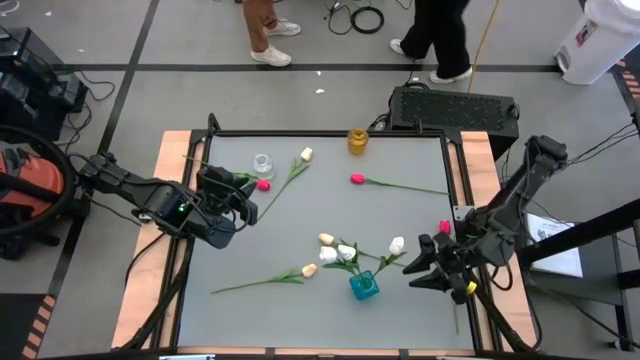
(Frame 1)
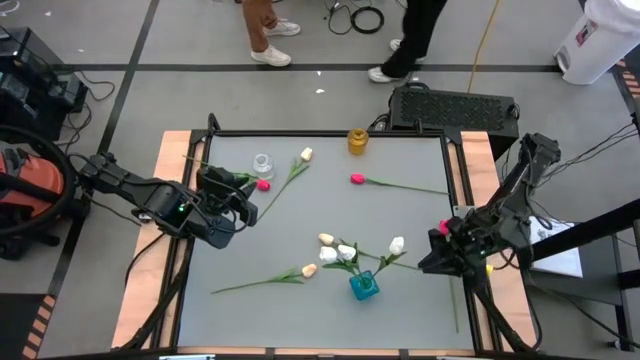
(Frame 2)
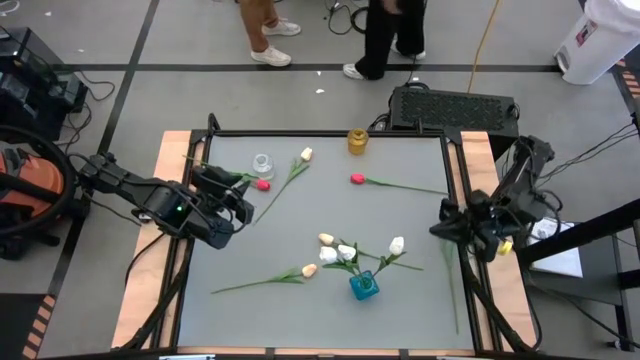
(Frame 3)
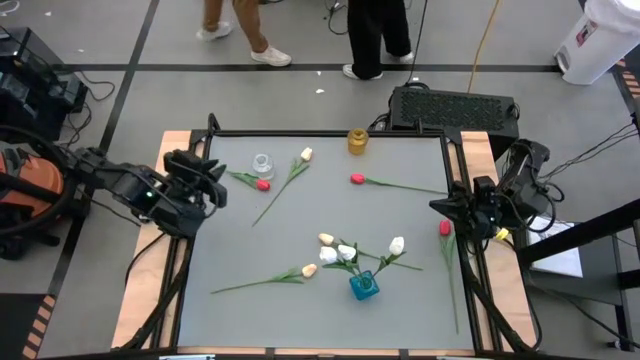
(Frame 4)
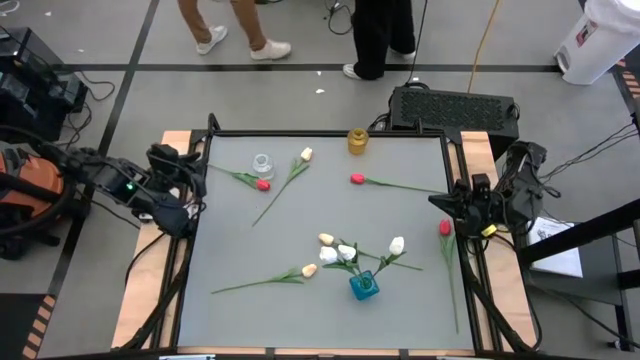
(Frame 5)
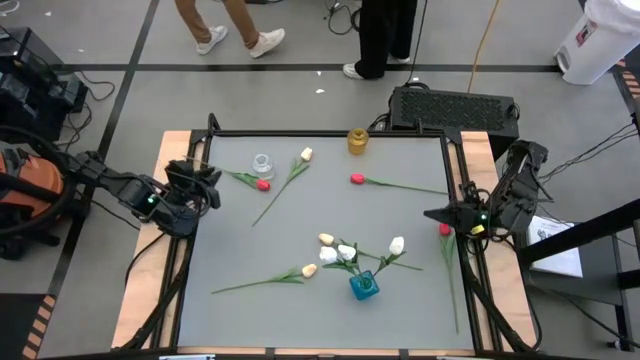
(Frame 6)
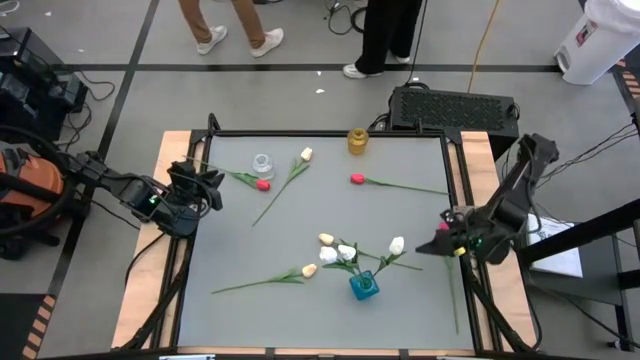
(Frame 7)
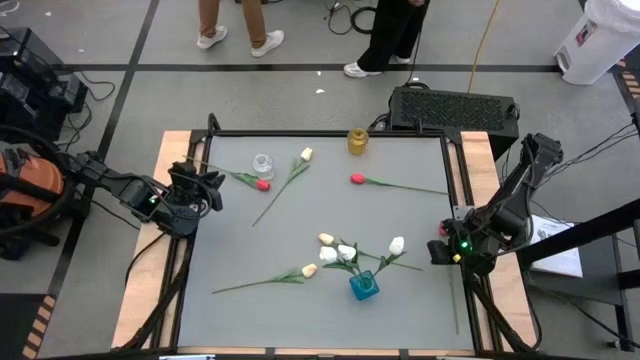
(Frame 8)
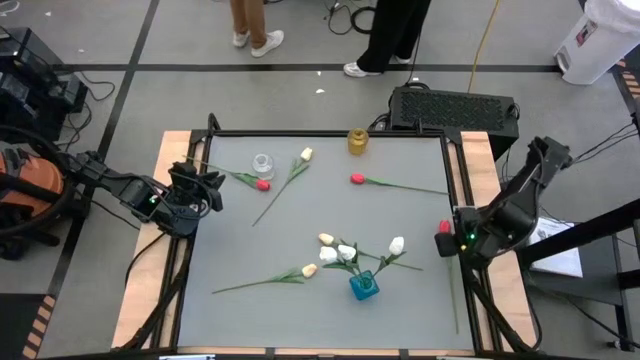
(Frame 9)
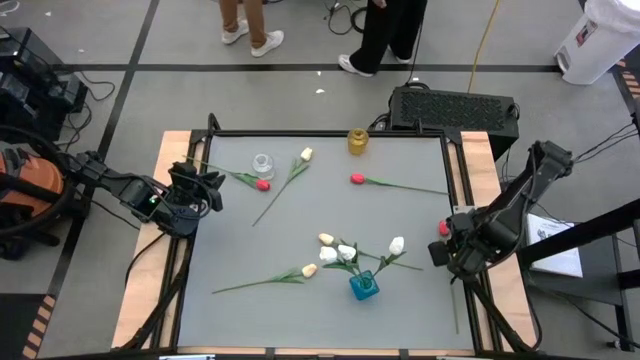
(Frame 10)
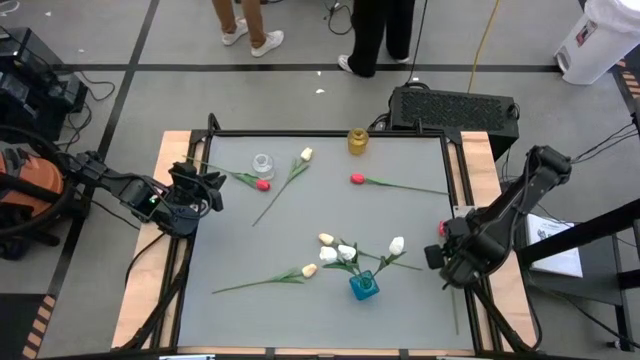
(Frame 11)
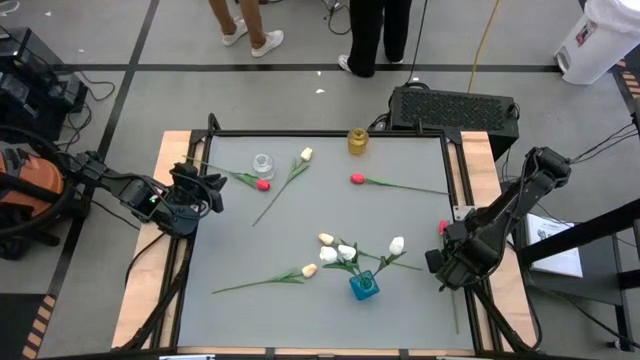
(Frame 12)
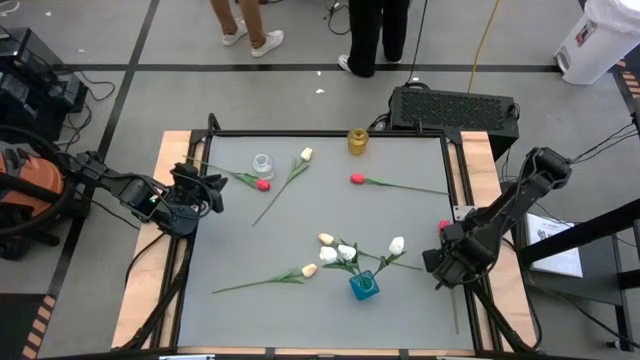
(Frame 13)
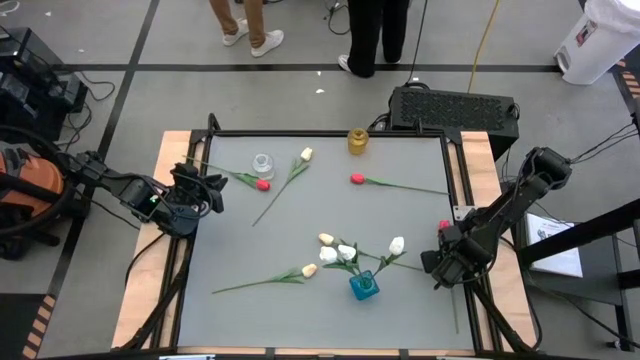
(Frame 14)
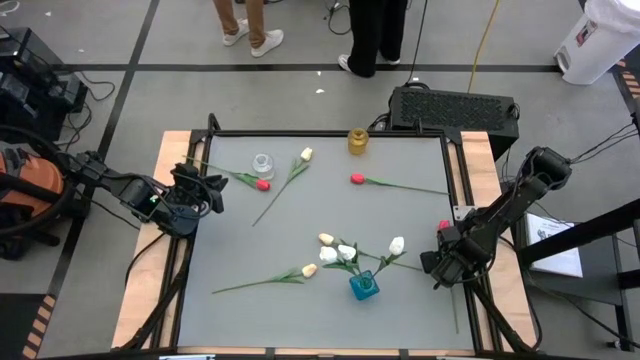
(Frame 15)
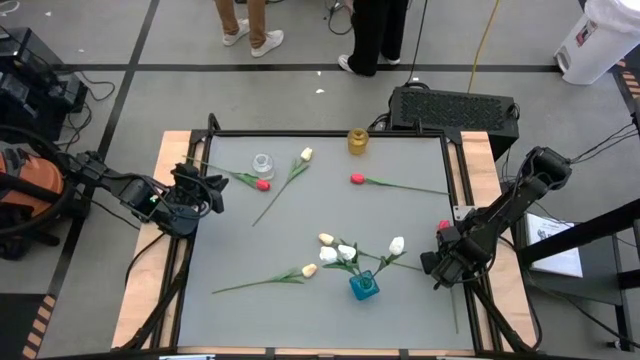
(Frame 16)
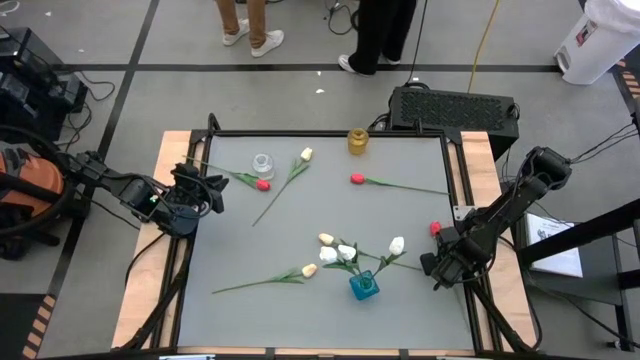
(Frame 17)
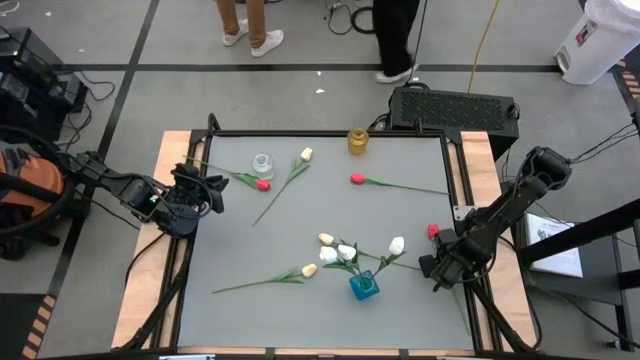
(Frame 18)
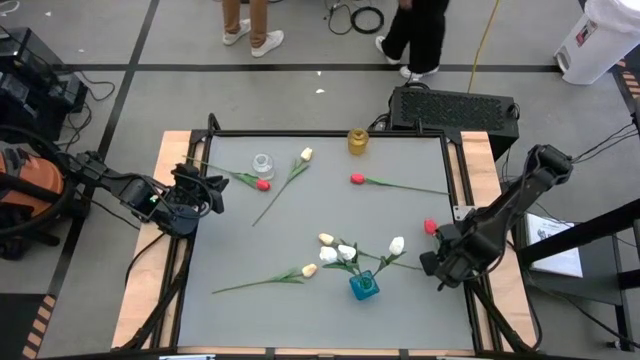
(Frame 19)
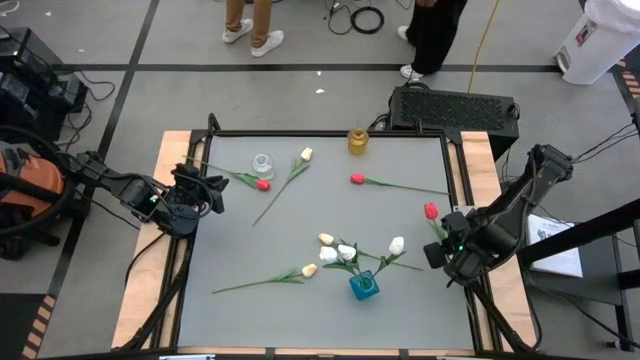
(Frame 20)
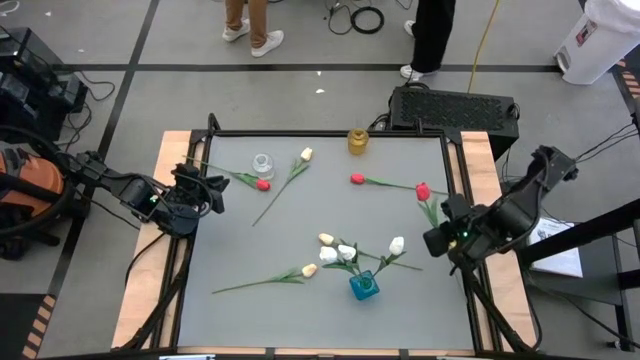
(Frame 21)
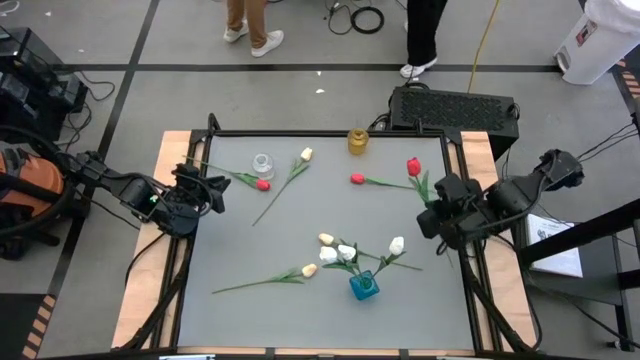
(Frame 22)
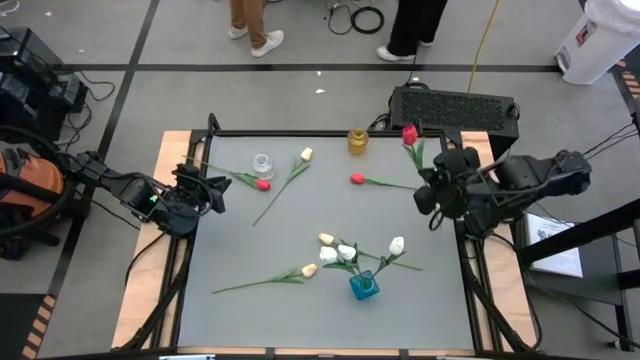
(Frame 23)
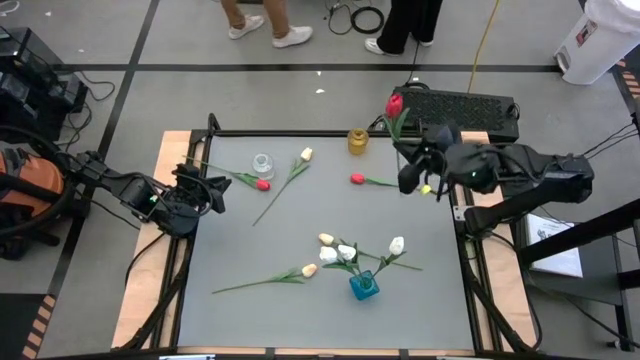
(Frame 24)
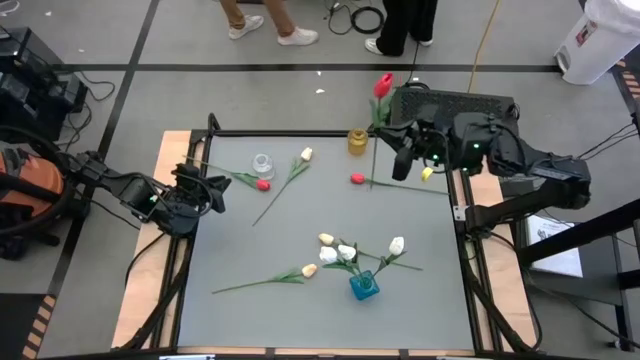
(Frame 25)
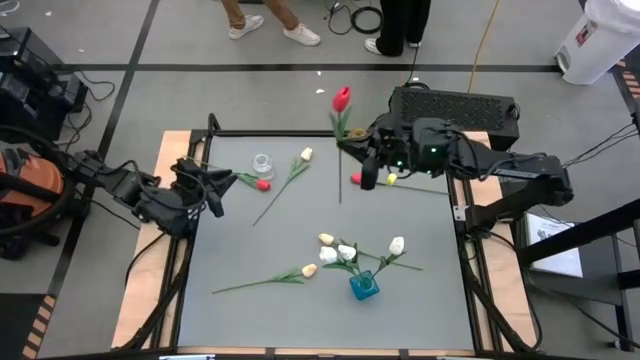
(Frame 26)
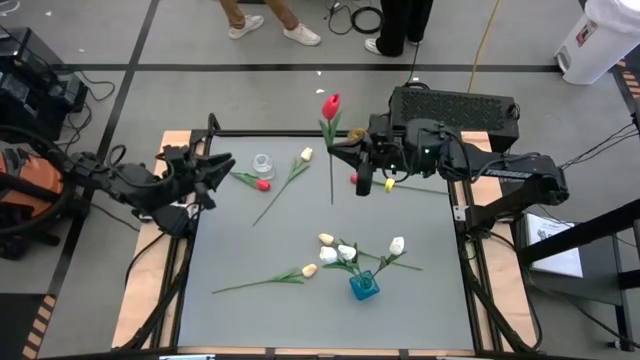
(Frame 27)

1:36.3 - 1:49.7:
Task: Sort flowers into vase by color
Put the bottom right red tulip into the transparent vase

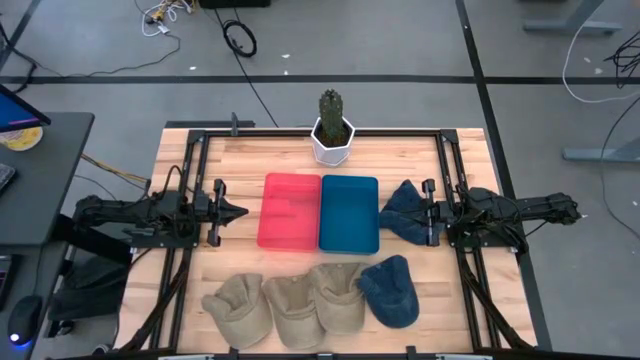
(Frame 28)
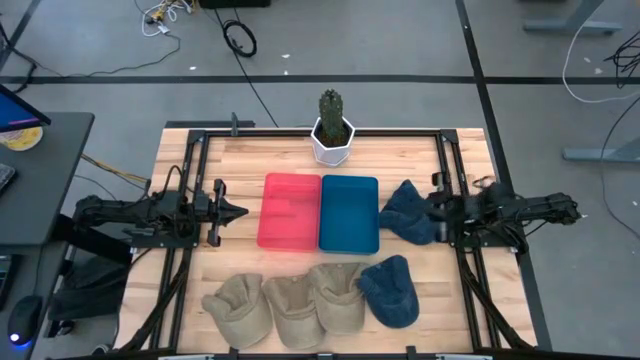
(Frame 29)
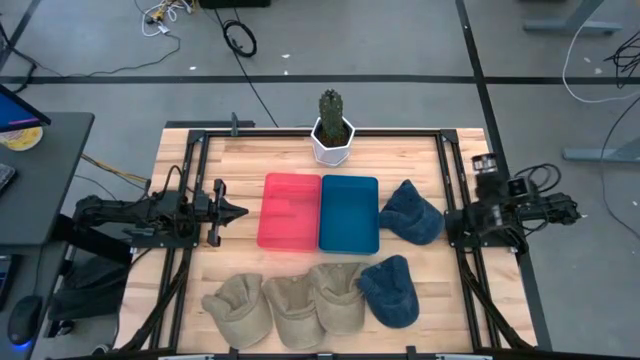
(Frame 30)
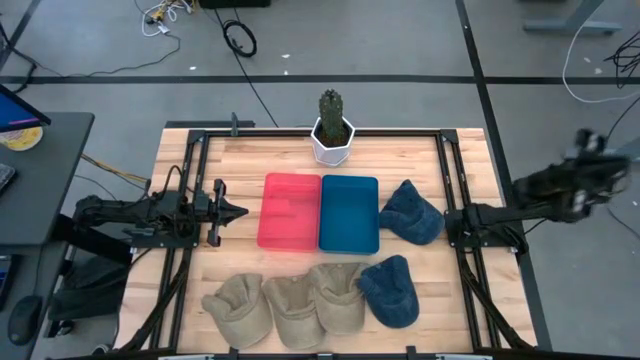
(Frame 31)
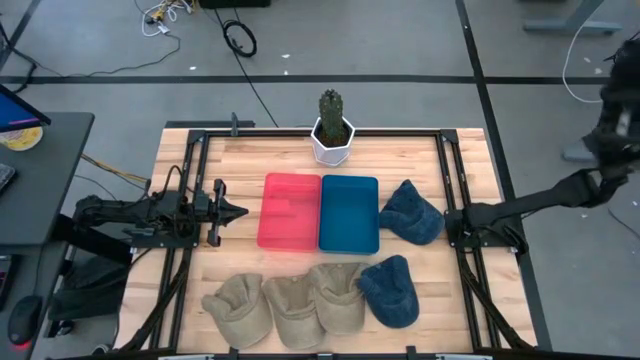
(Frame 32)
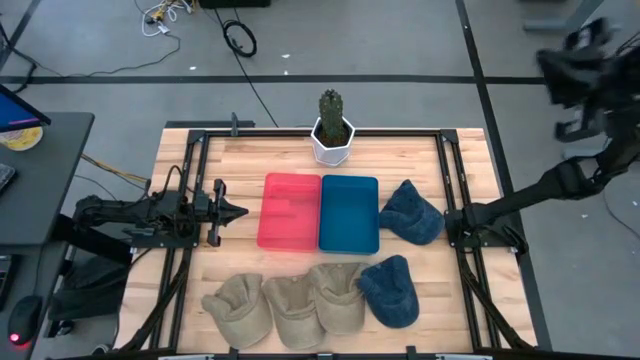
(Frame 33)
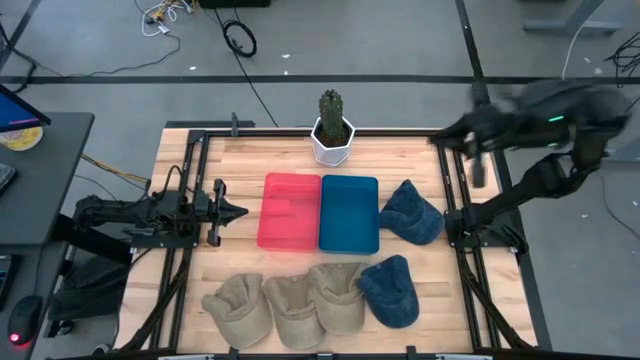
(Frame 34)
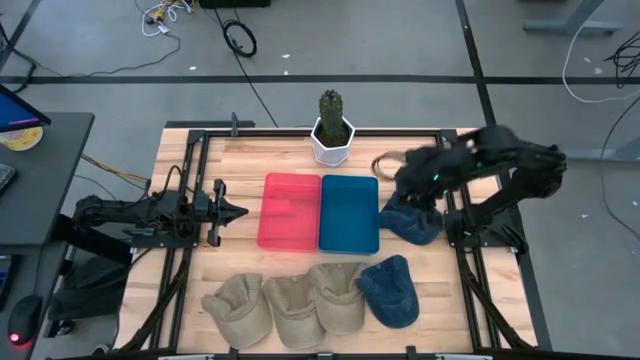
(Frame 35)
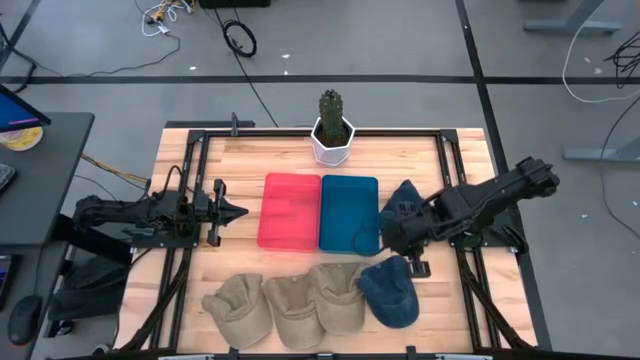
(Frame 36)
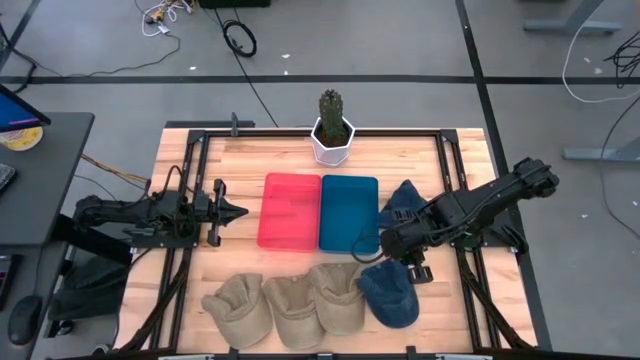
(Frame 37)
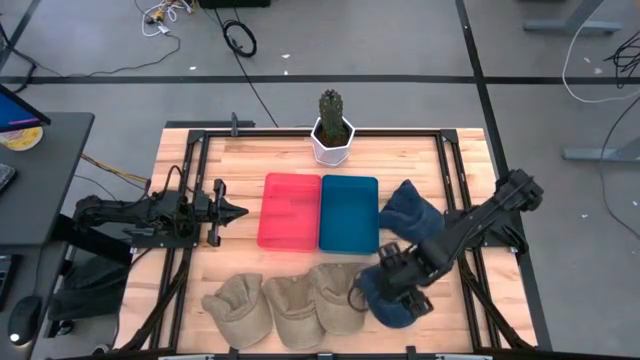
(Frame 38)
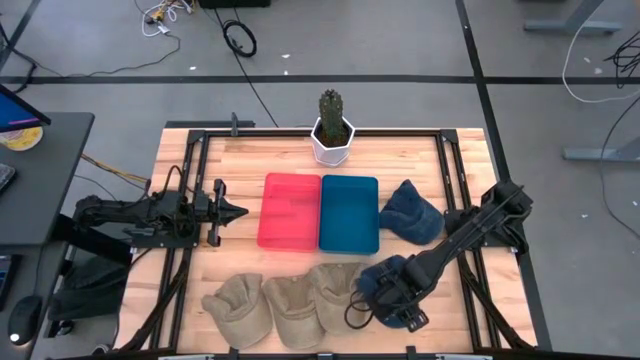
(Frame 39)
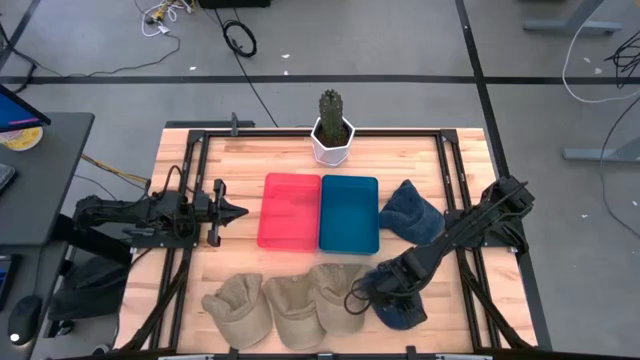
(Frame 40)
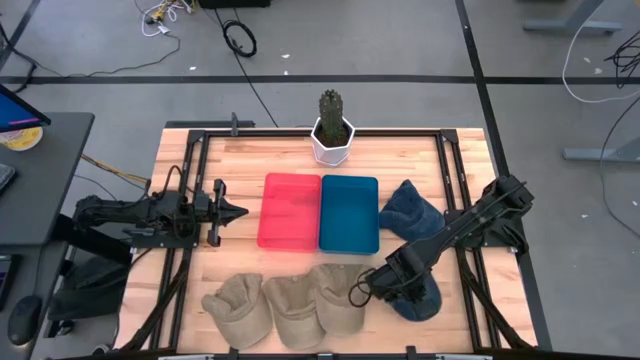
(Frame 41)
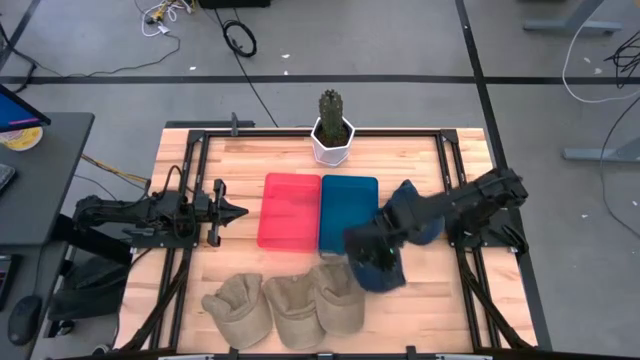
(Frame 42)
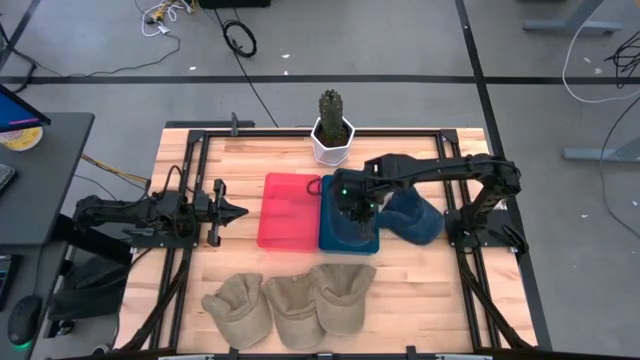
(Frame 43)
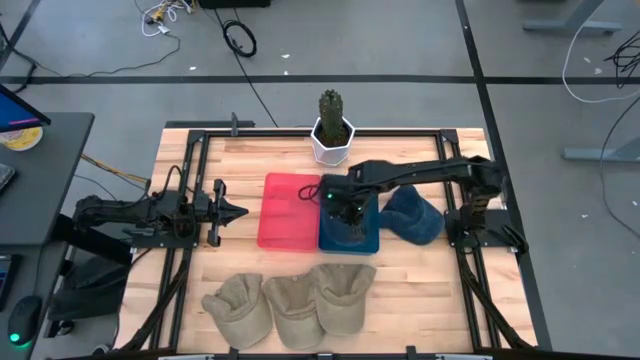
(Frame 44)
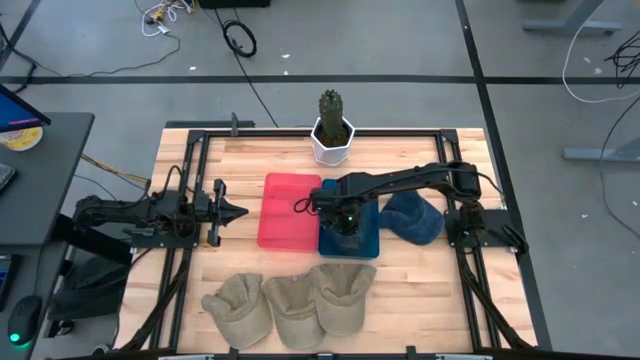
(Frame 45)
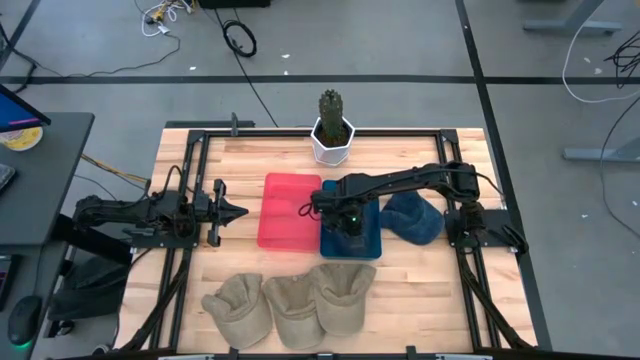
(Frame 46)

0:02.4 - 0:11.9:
Task: Pick & Place hat
Put the bottom blue cap into the blue bin
